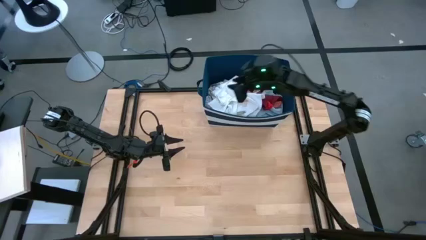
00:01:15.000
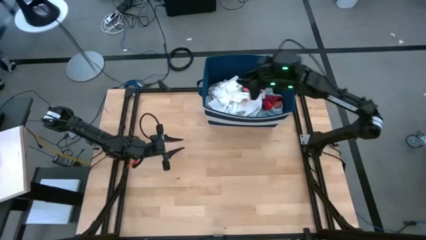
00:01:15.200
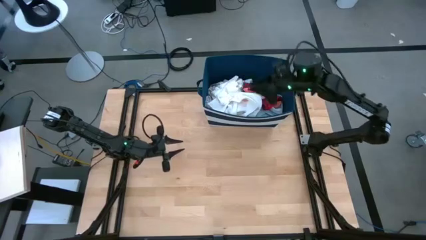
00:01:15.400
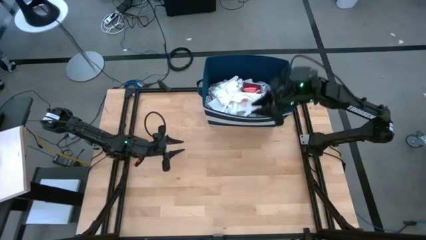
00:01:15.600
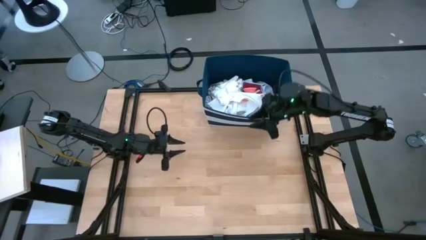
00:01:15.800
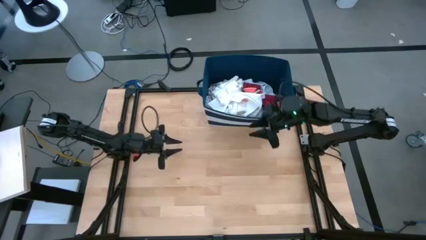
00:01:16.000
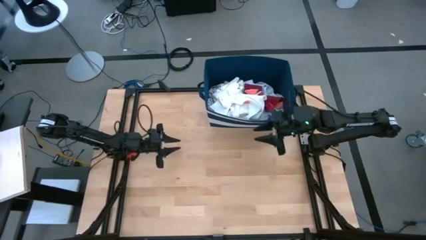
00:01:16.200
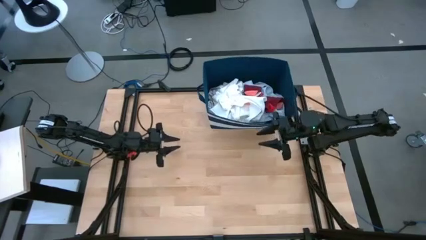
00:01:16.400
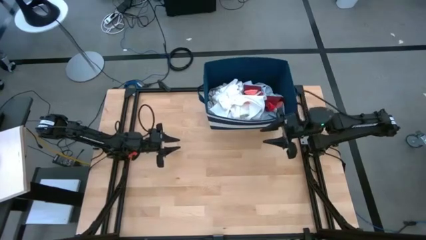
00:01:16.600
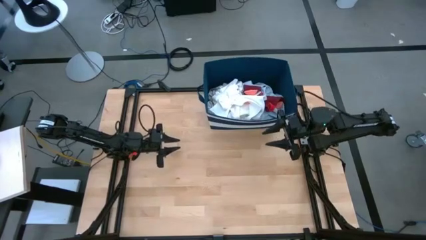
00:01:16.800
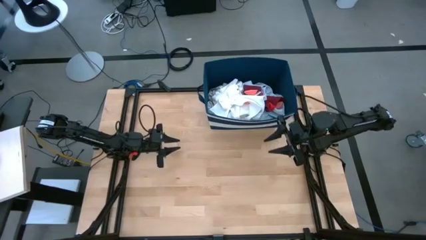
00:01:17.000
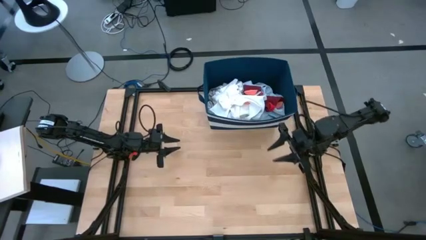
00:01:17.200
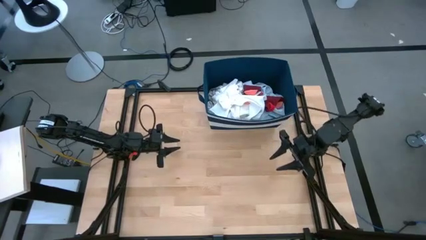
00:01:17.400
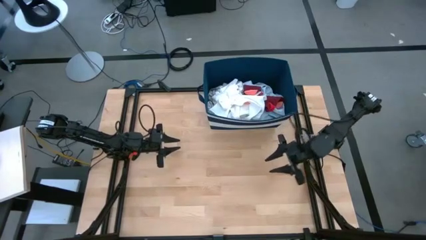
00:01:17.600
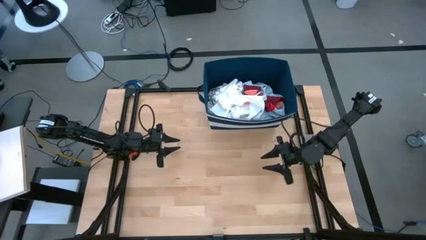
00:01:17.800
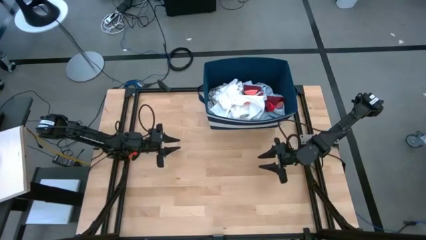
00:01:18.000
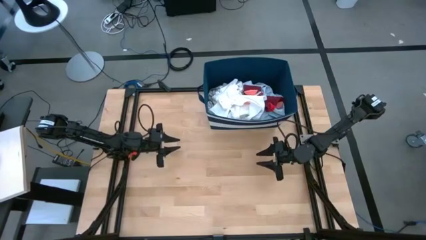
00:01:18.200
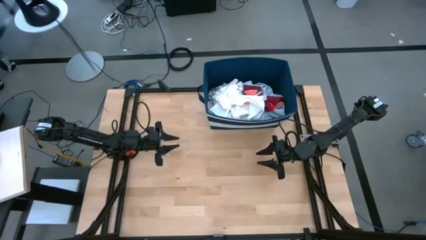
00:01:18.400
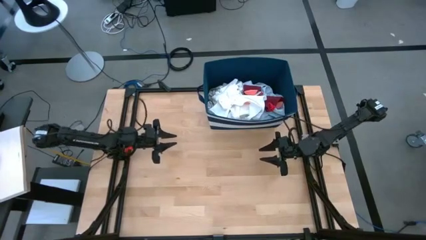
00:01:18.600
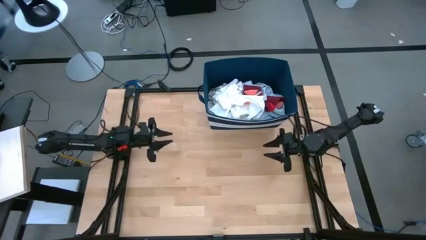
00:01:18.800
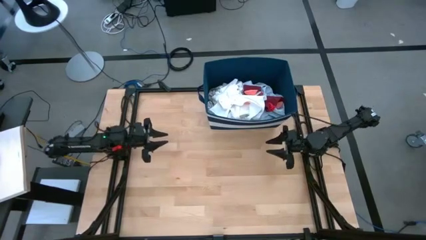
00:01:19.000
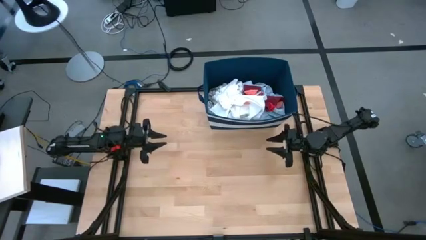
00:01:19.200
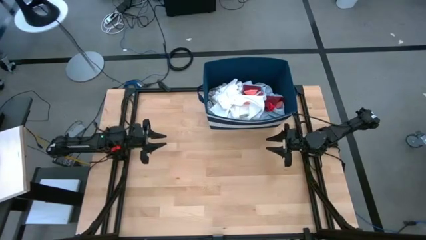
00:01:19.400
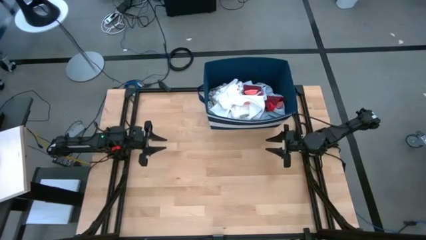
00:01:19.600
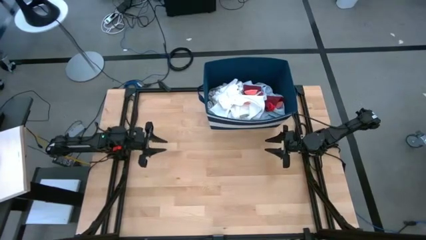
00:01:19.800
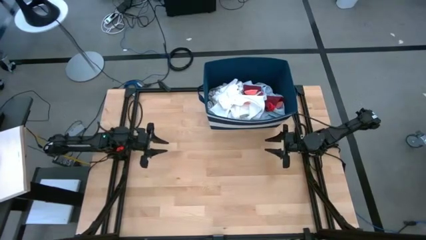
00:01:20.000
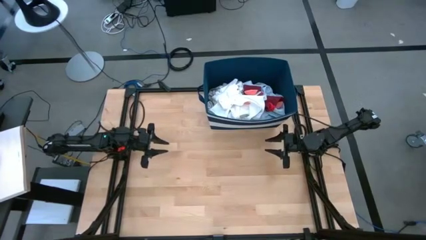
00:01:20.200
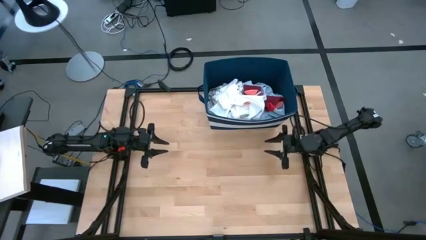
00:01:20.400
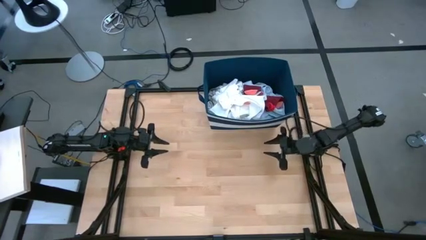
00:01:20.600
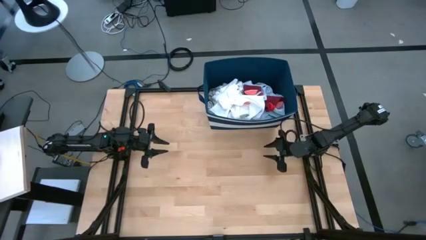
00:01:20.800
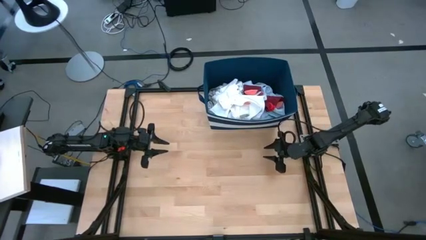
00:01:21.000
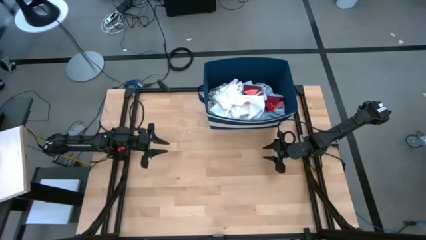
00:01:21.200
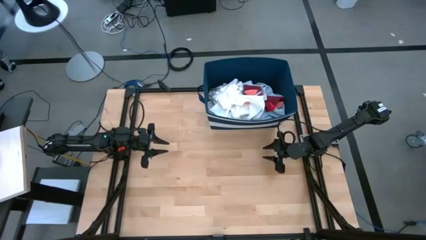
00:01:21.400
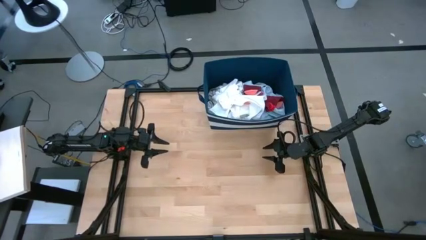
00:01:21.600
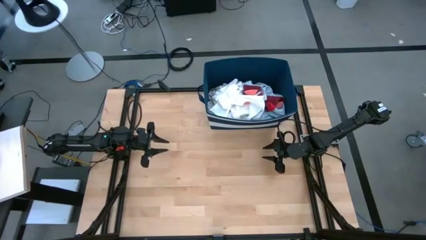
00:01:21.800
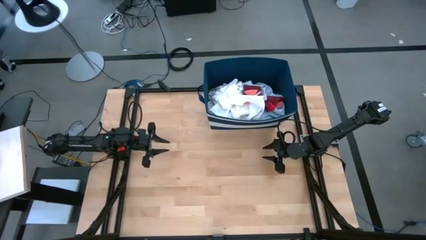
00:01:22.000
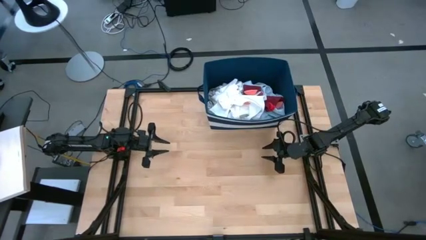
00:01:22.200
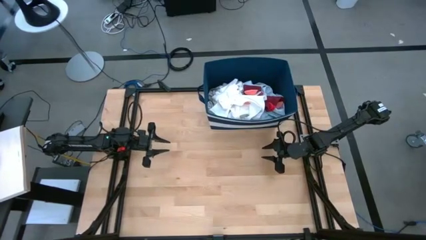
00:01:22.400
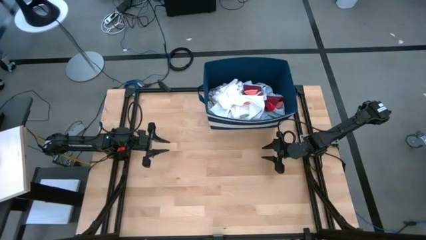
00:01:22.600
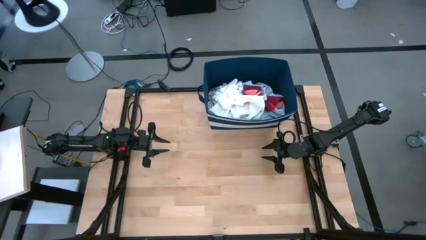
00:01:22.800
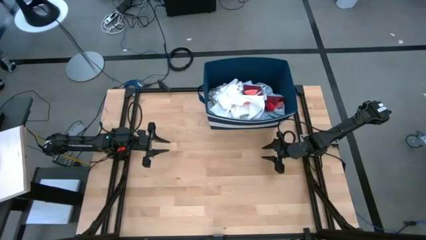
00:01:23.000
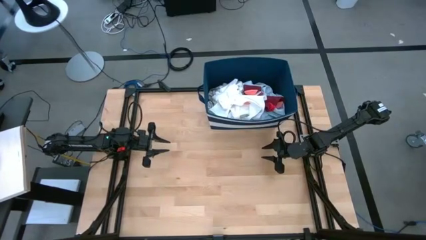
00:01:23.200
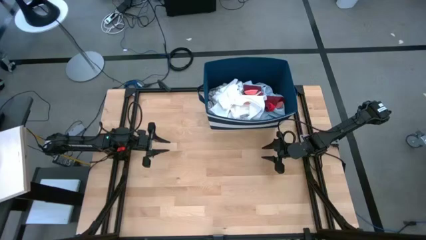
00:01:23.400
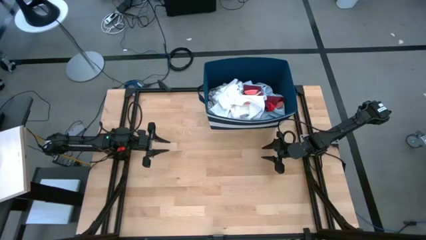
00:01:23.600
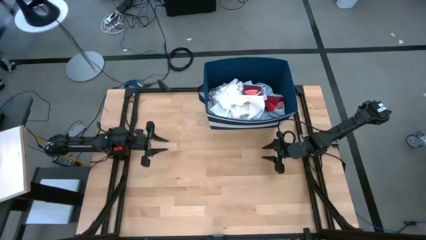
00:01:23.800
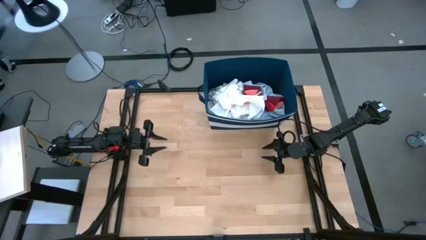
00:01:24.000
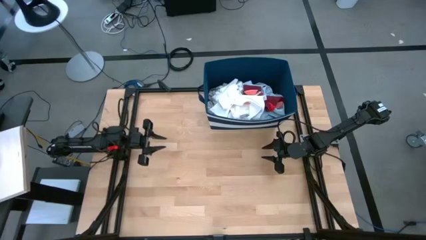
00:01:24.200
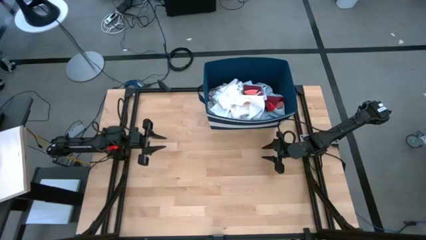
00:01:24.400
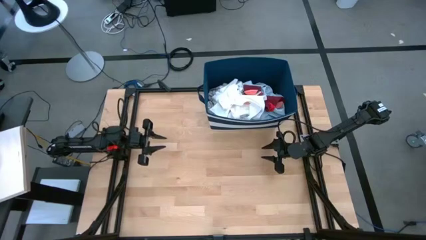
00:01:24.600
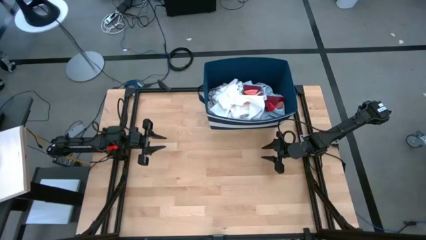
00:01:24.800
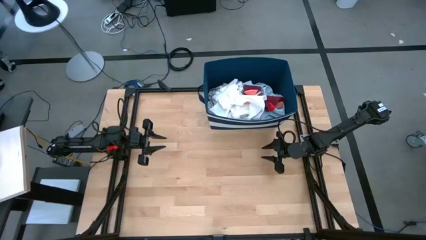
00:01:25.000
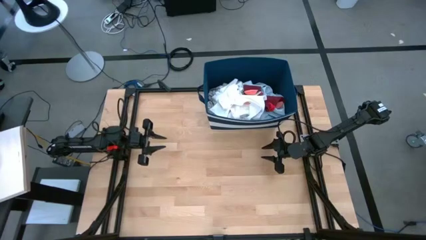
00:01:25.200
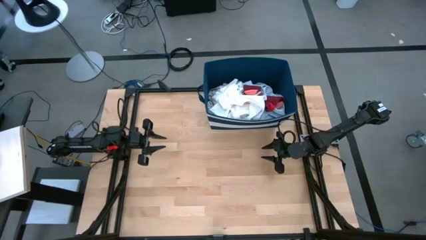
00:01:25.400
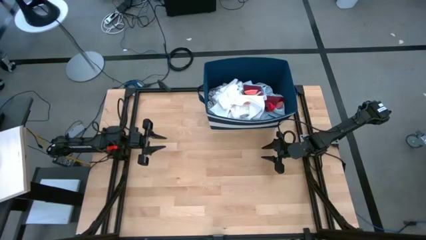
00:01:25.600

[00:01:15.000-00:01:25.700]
Task: Sort clothes
Return to Home Position
